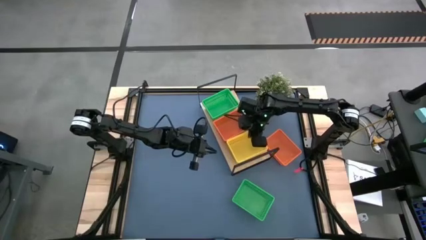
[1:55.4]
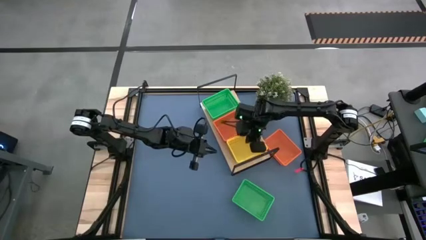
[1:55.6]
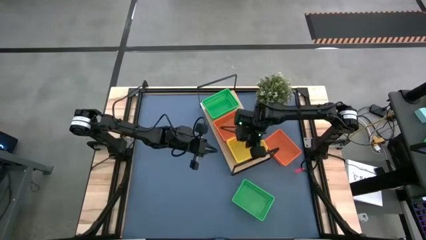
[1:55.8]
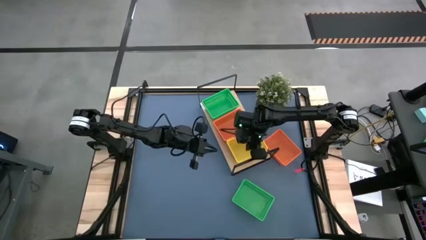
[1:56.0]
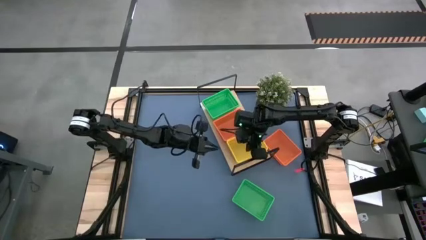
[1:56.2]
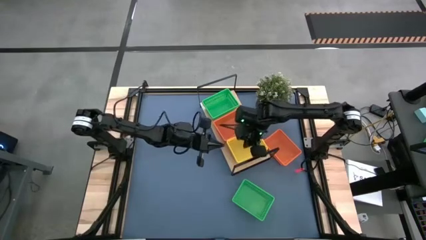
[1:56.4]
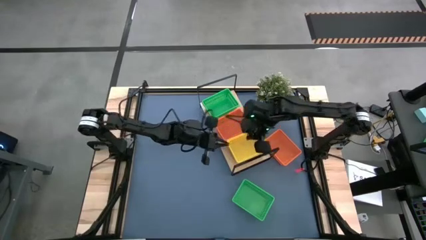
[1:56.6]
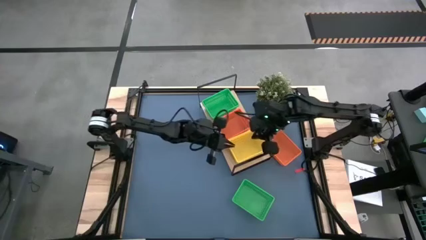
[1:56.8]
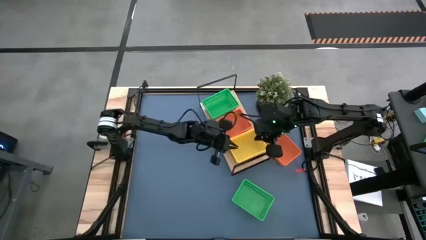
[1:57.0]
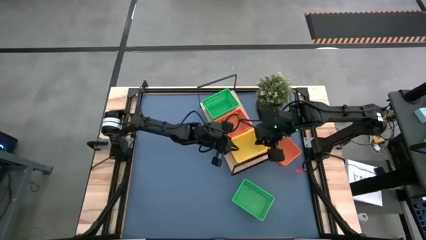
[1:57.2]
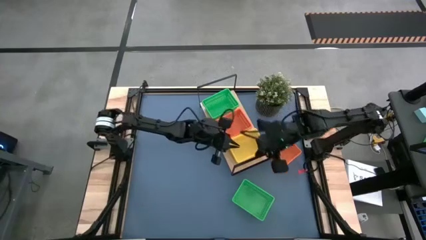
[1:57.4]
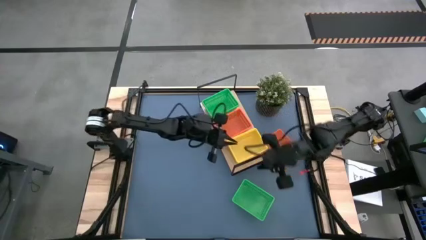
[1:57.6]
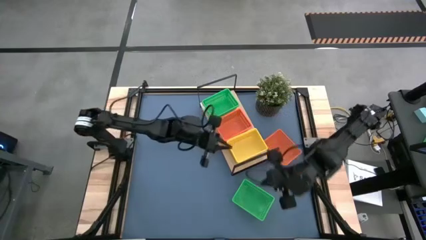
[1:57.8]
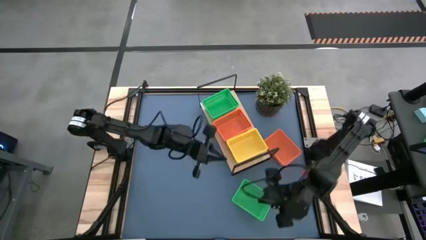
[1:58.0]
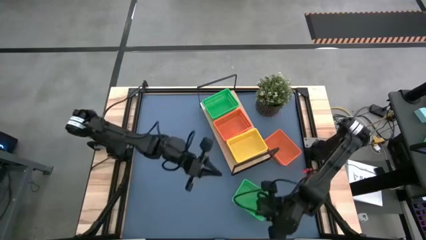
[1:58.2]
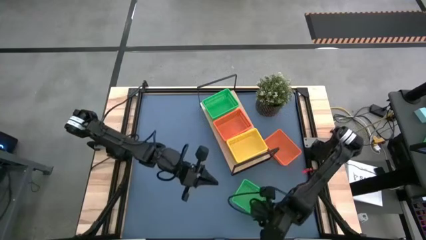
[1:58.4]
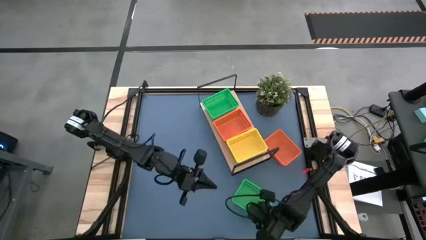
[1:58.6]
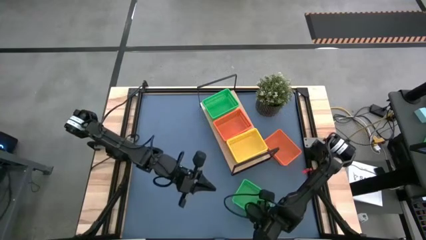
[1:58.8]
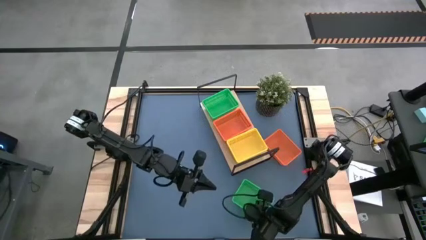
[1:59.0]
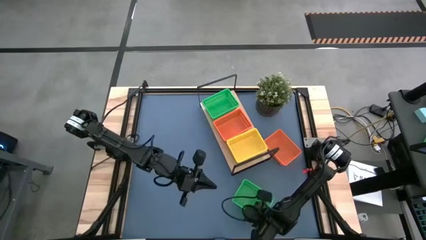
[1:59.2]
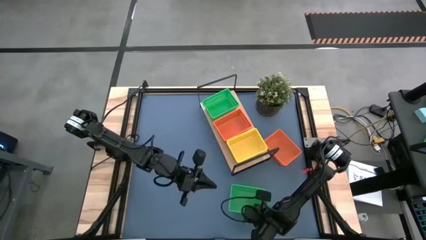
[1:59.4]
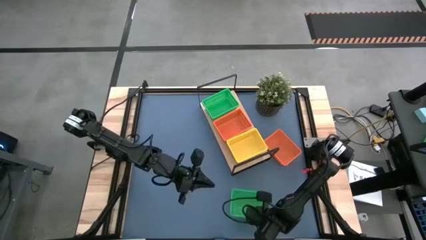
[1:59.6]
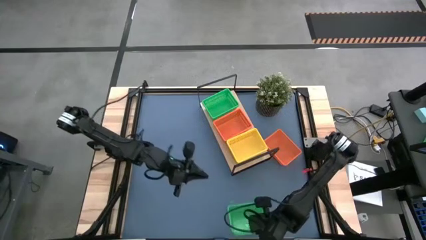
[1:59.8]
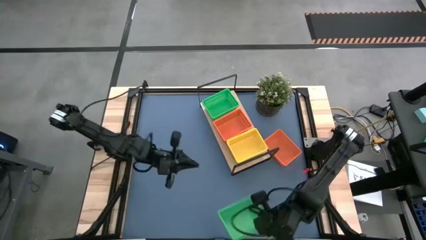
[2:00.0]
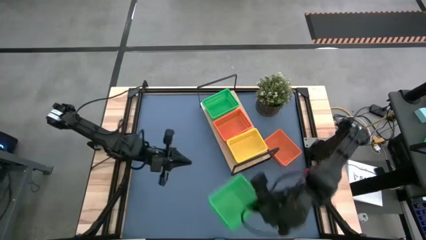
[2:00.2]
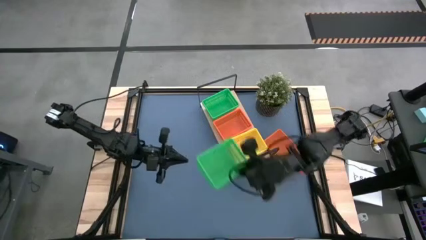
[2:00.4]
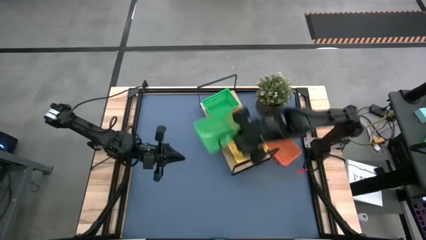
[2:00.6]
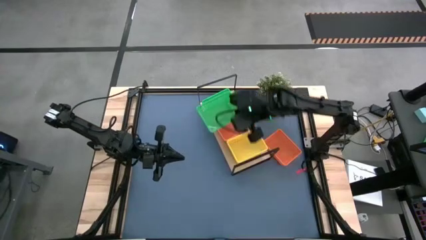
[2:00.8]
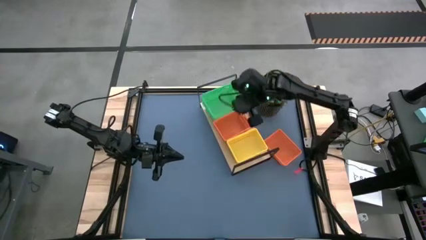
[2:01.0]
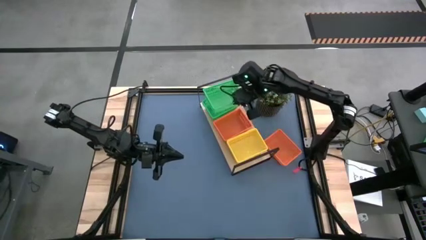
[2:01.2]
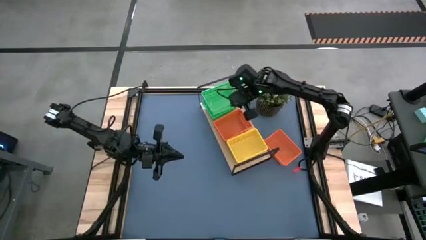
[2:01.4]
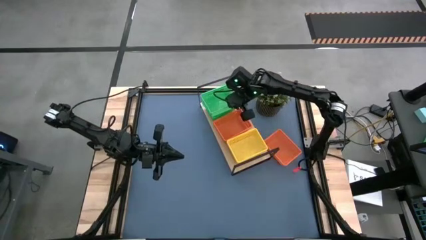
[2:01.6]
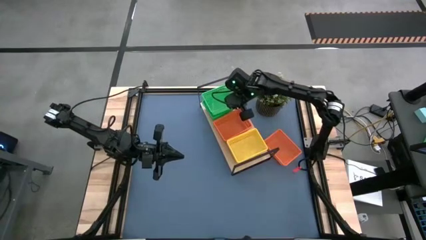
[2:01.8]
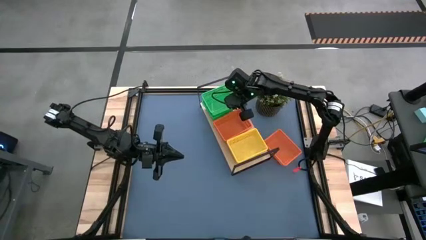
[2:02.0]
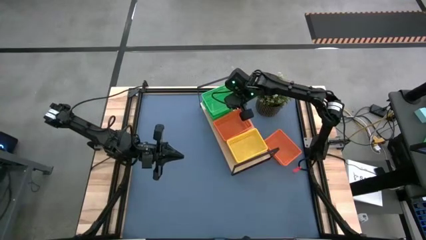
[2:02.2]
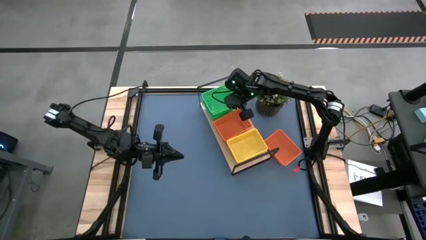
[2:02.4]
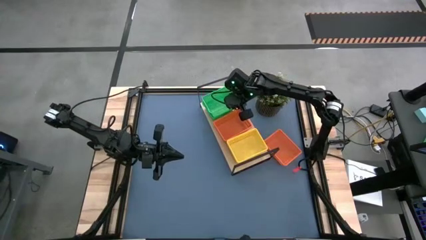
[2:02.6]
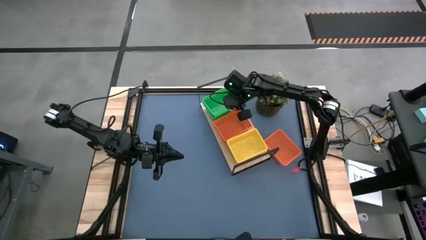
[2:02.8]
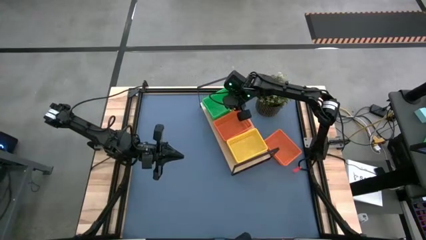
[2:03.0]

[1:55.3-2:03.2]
Task: Stack baskets on shelf by color
Stack the green bin on top of the green bin on the shelf

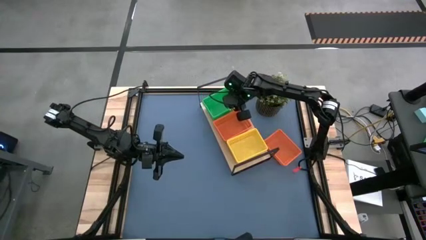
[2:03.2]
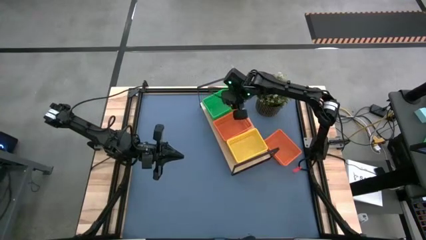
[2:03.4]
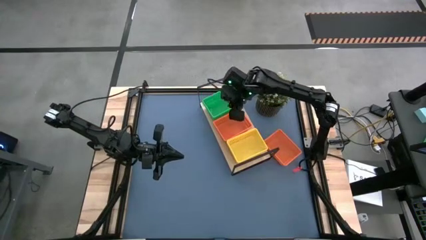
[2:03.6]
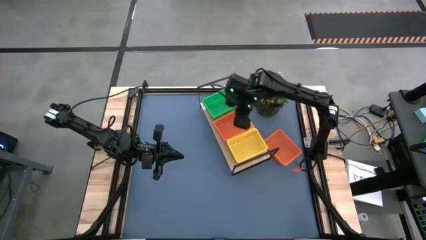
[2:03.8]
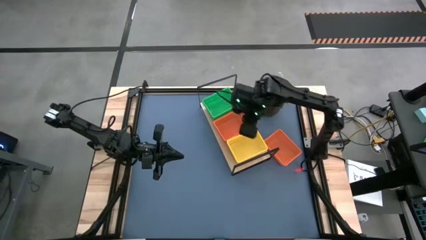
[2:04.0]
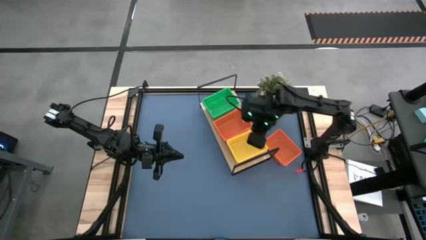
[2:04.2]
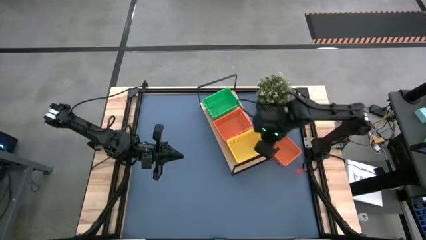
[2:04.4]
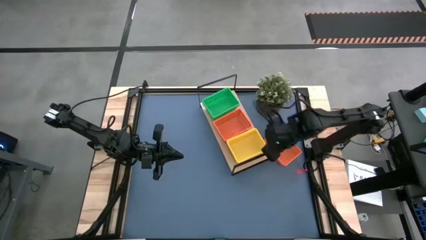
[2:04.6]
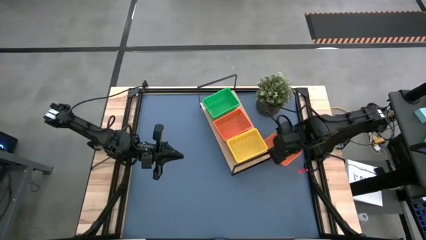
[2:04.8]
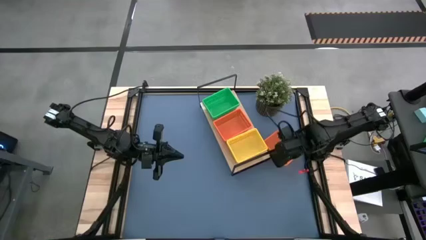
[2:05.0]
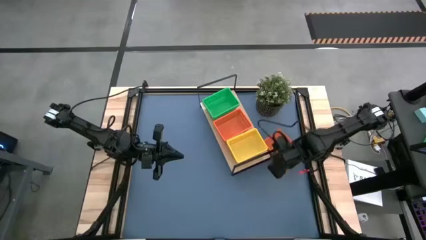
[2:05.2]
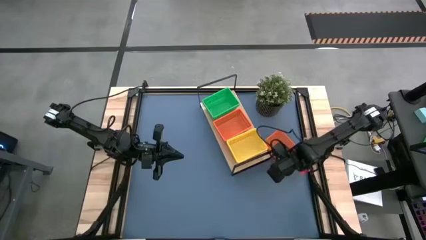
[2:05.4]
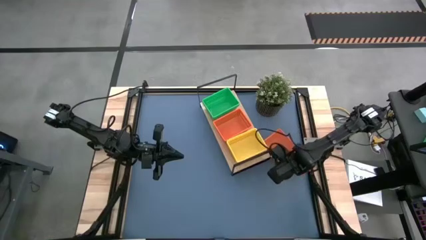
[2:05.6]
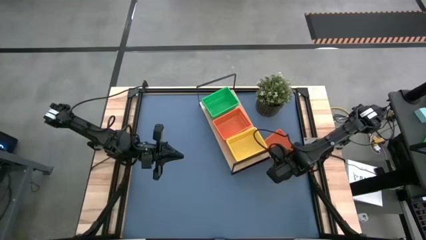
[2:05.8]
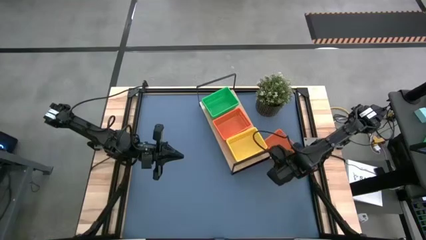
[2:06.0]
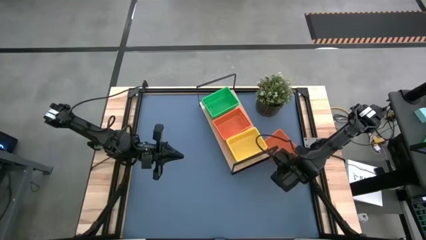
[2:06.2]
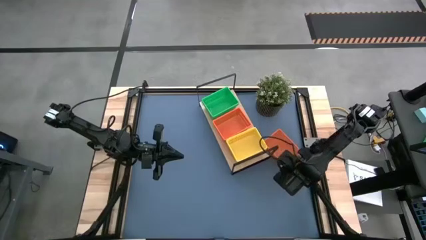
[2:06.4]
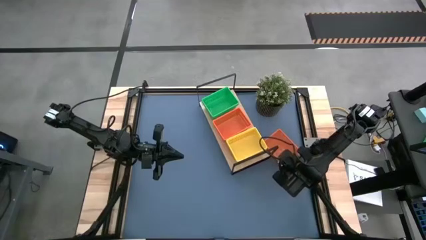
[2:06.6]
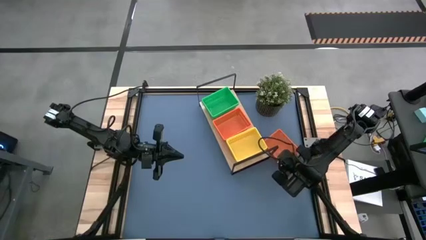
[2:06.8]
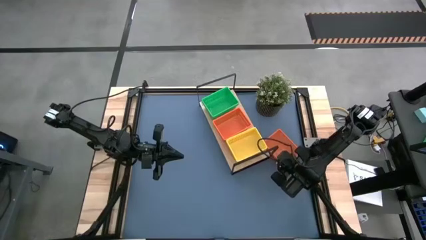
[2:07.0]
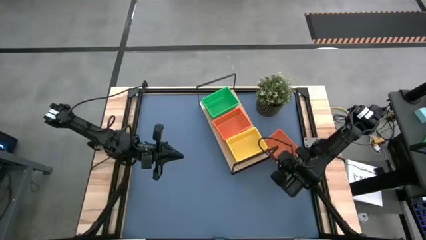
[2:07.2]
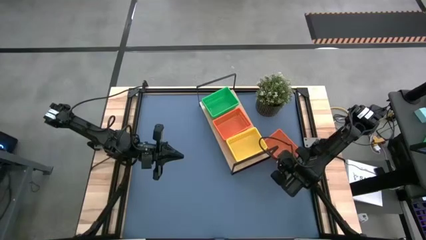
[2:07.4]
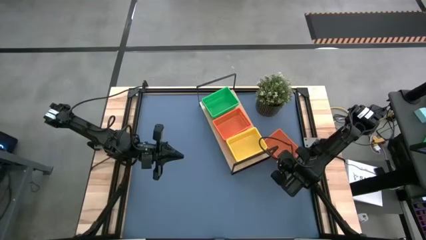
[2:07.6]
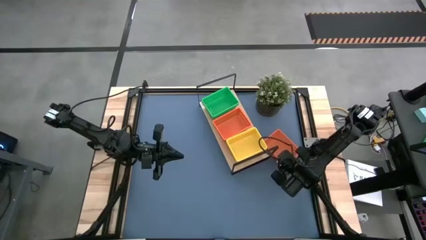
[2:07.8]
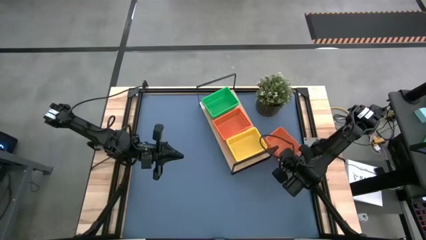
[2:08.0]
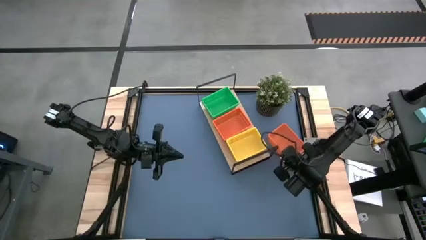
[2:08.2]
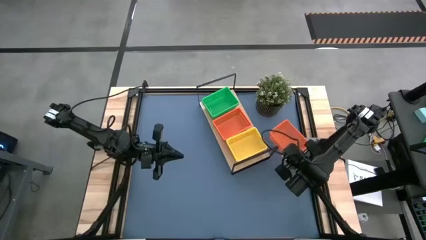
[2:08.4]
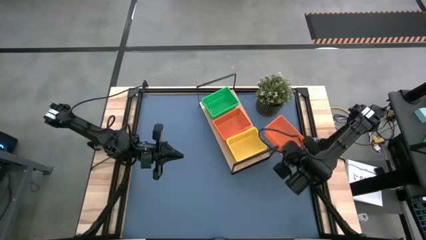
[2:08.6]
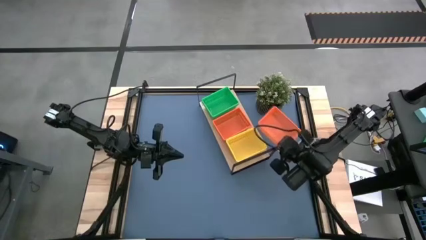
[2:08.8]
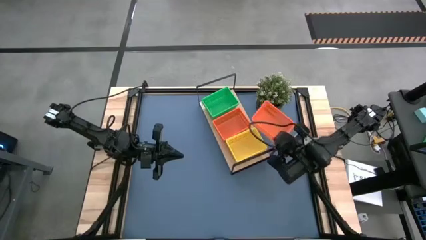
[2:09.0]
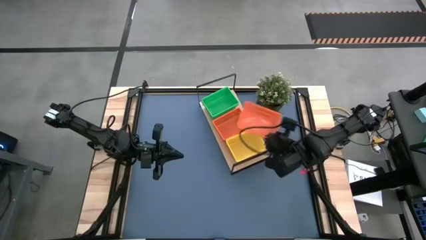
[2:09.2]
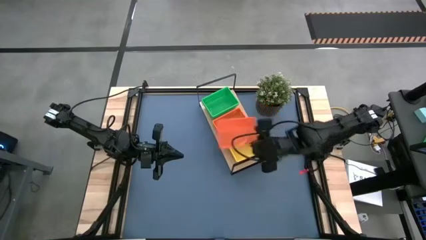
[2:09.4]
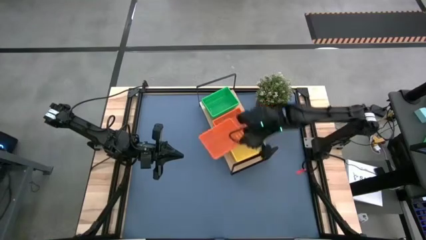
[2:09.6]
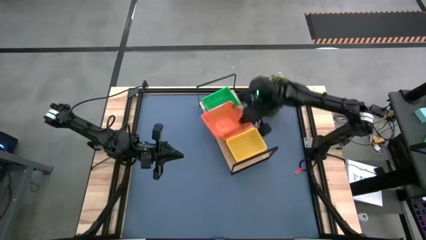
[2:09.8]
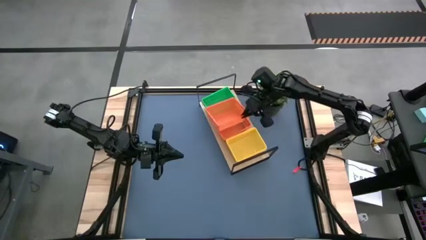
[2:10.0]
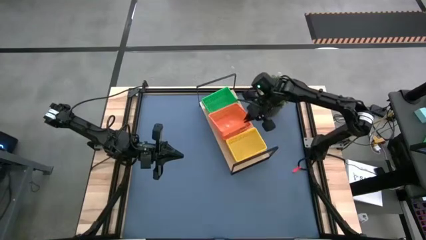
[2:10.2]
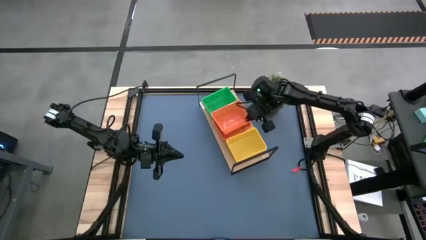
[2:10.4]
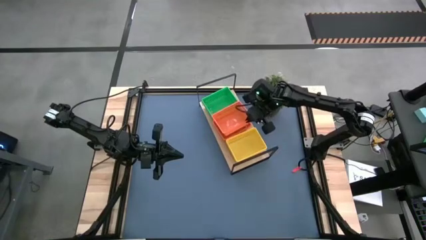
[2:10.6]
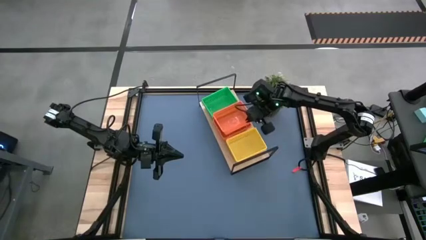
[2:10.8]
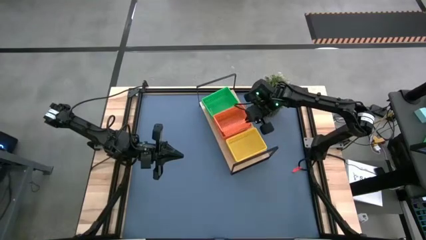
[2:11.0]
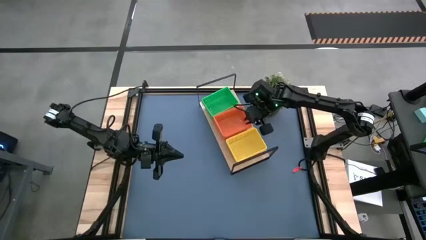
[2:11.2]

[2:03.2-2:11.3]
Stack the orange bin on top of the orange bin on the shelf
